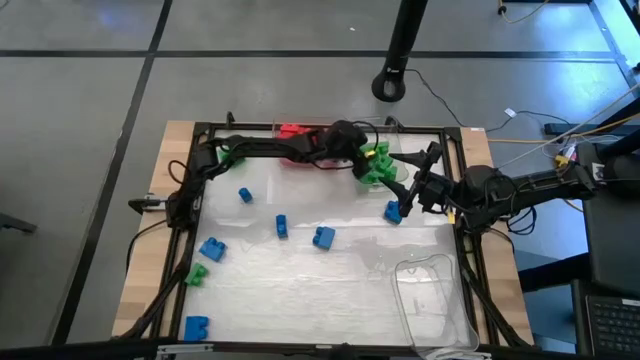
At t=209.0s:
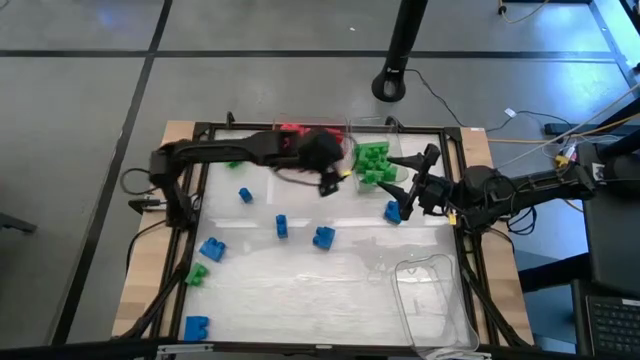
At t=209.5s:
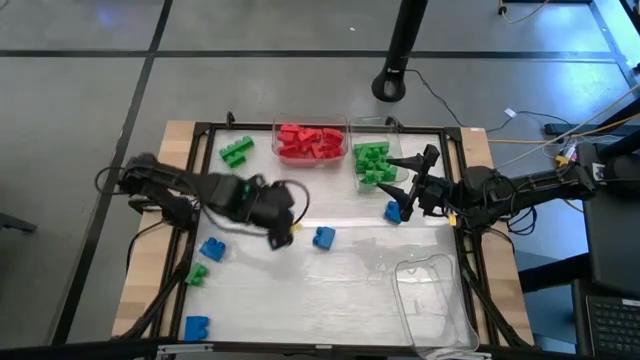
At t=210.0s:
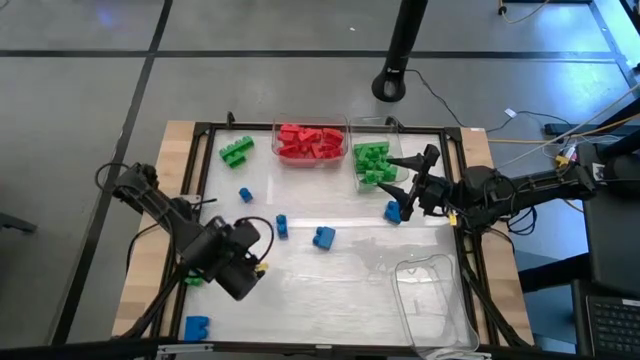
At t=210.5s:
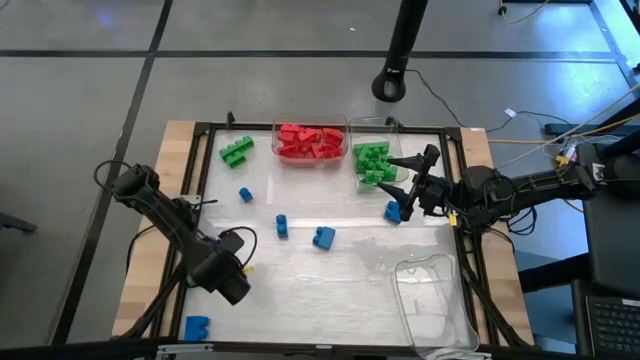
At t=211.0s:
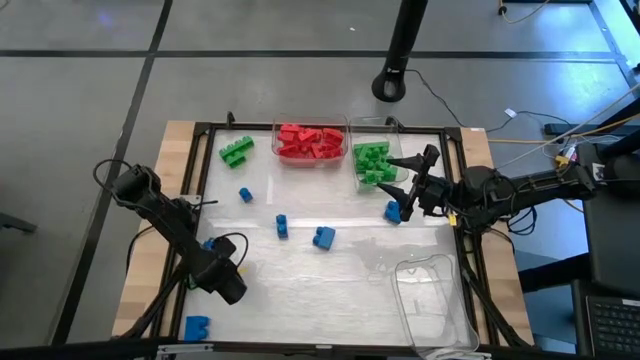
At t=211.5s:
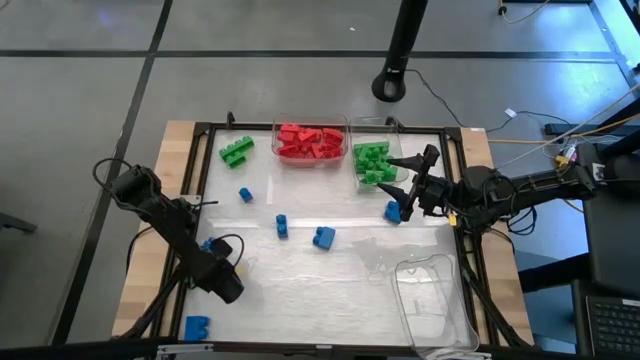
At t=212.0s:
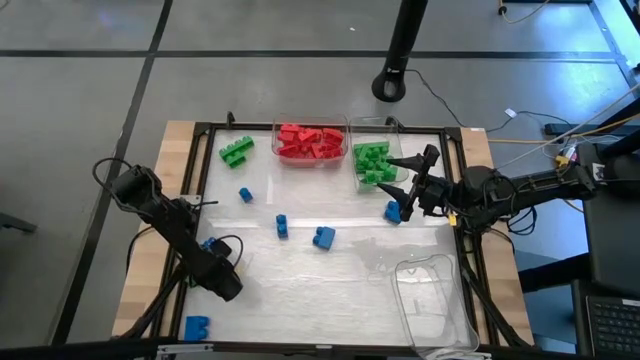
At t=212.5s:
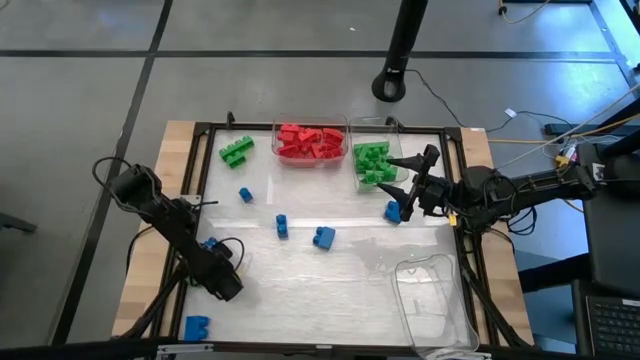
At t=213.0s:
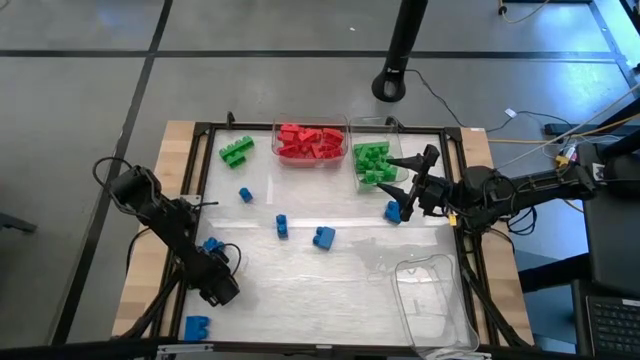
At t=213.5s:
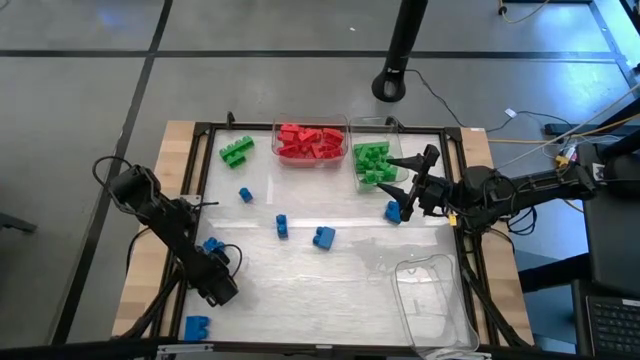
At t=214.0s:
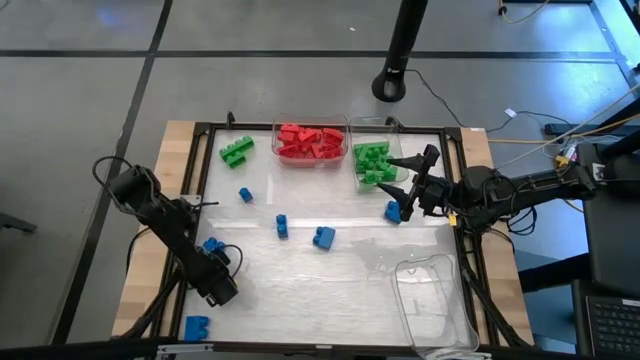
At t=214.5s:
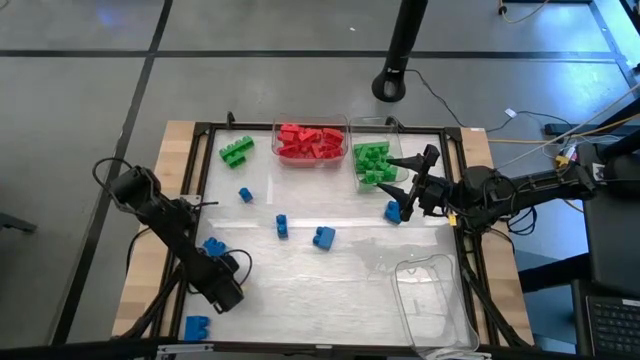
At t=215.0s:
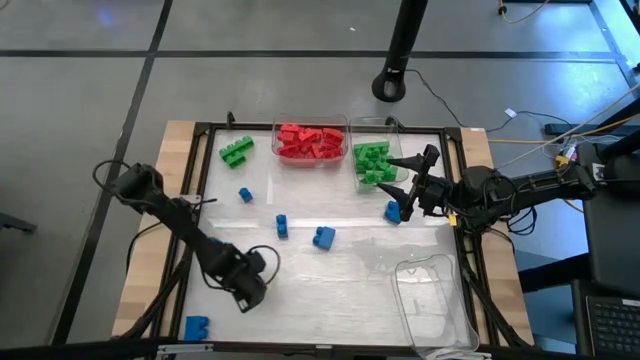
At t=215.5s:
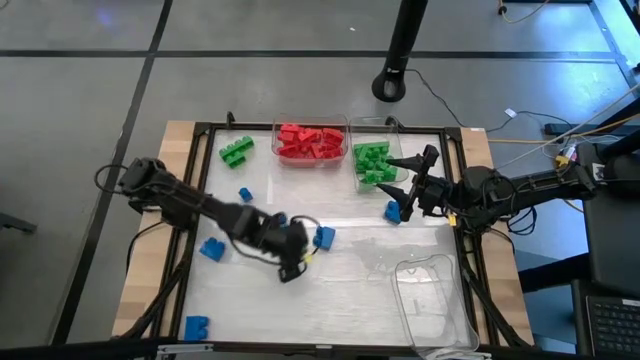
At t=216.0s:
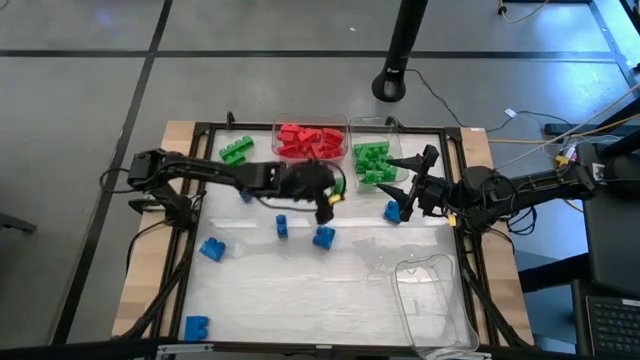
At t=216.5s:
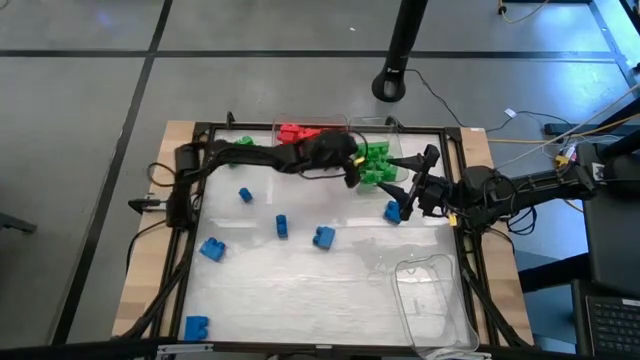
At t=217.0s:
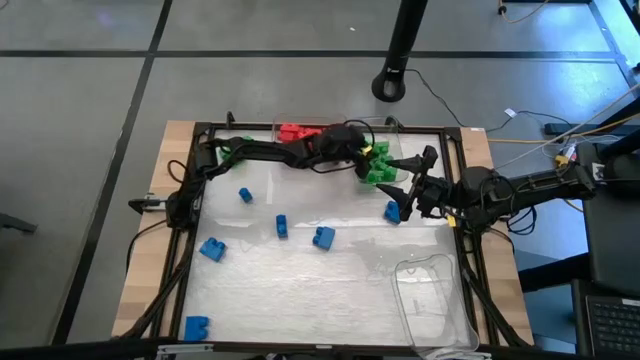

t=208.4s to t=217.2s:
Task: Sort blocks
Put the green game piece into the top right transparent bin

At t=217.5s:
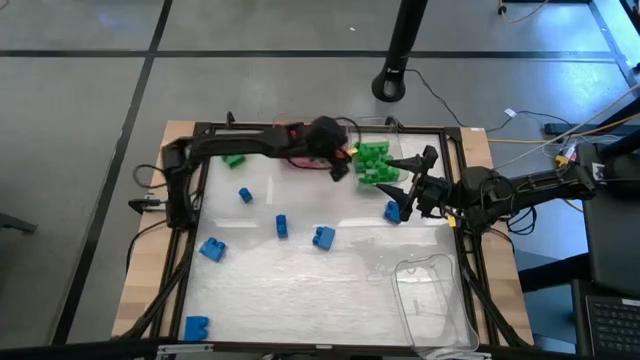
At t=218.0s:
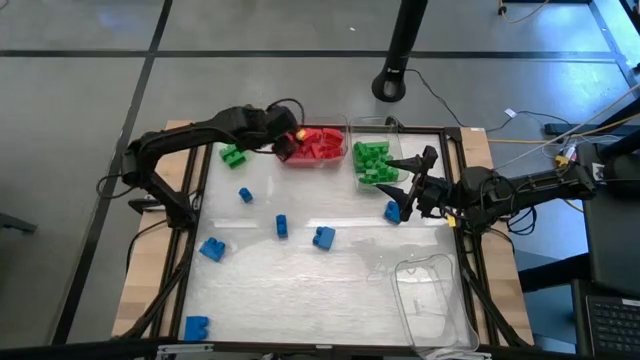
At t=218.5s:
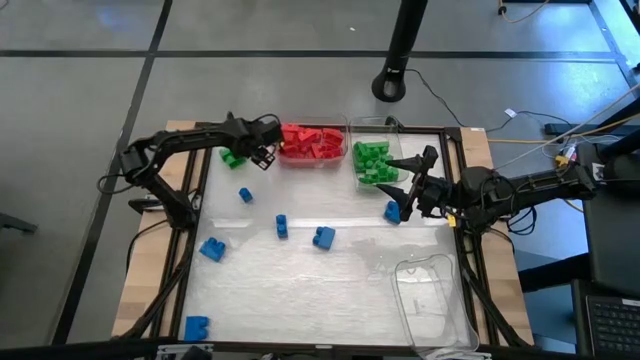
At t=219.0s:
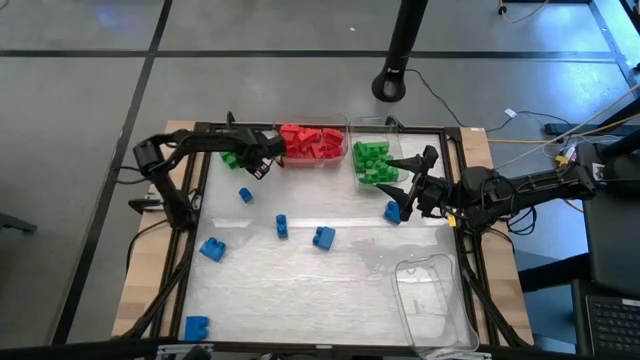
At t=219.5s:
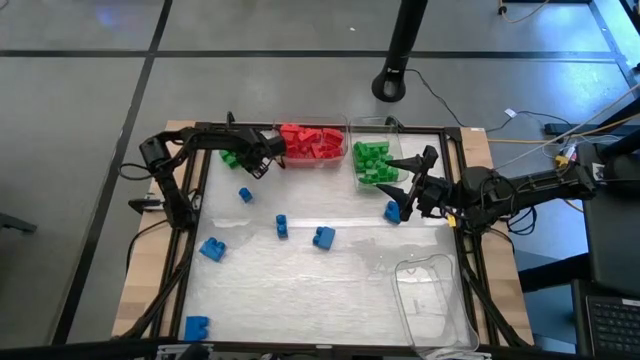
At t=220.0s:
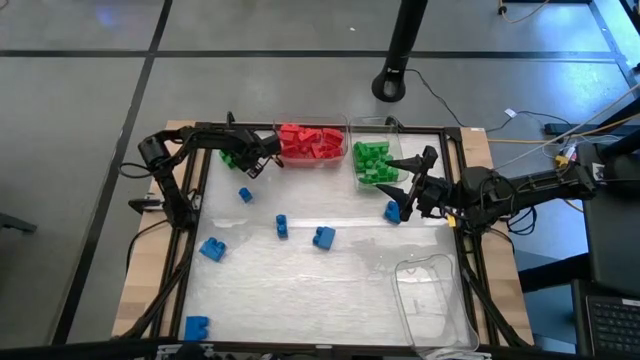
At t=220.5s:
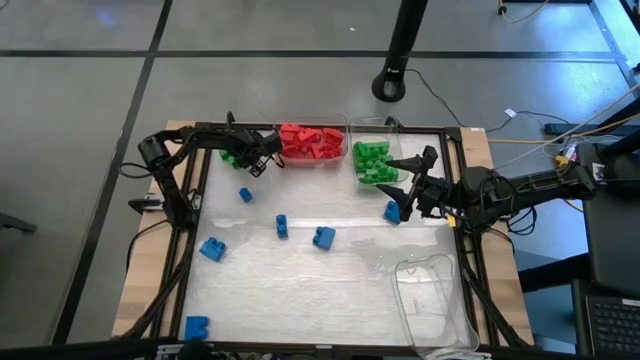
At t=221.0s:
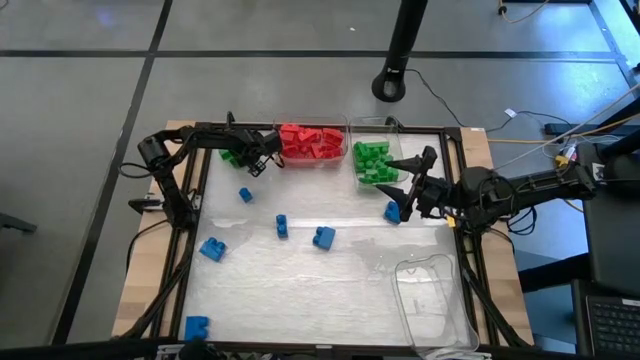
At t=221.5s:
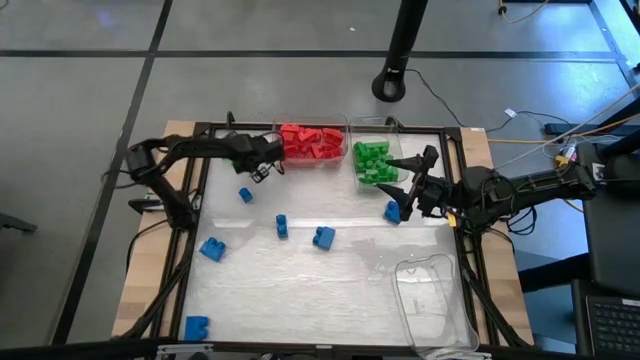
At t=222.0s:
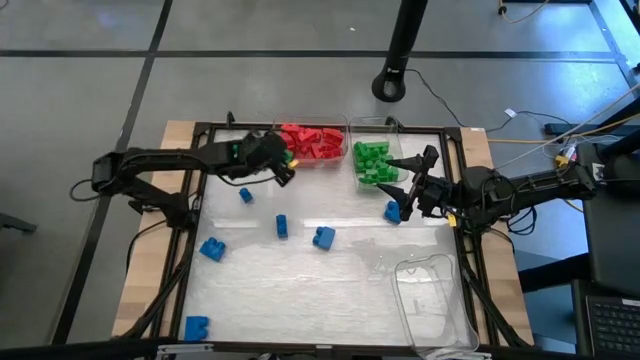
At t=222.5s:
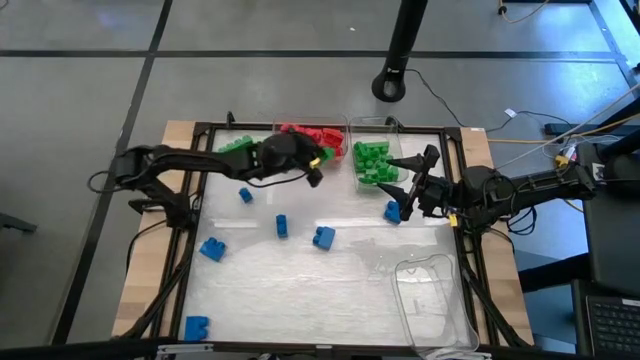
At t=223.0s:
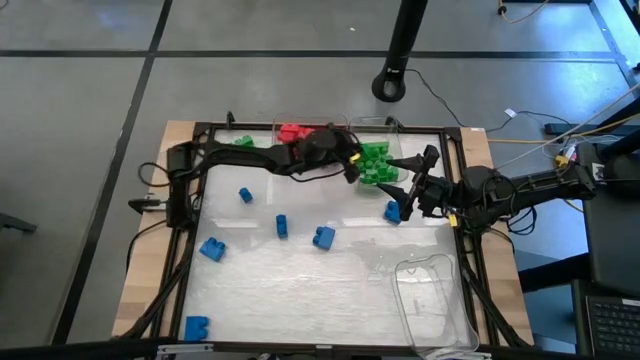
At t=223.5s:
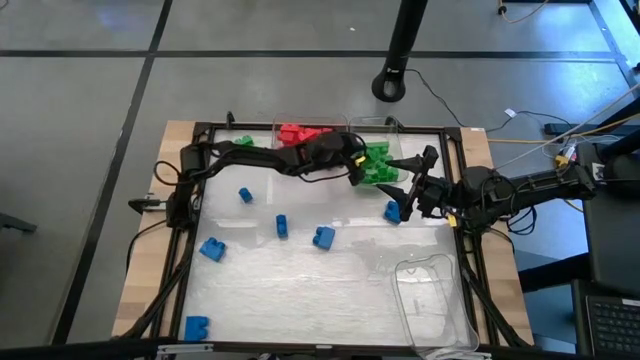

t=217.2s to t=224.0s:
Put the green game piece into the top right transparent bin

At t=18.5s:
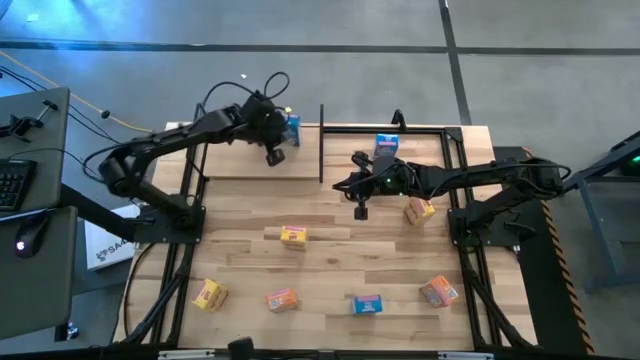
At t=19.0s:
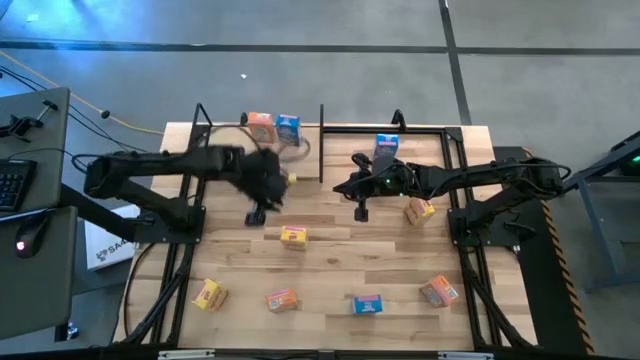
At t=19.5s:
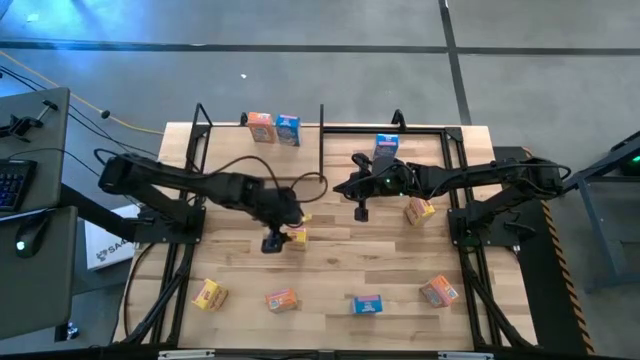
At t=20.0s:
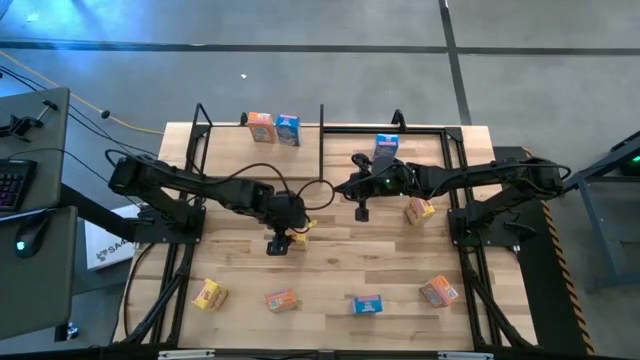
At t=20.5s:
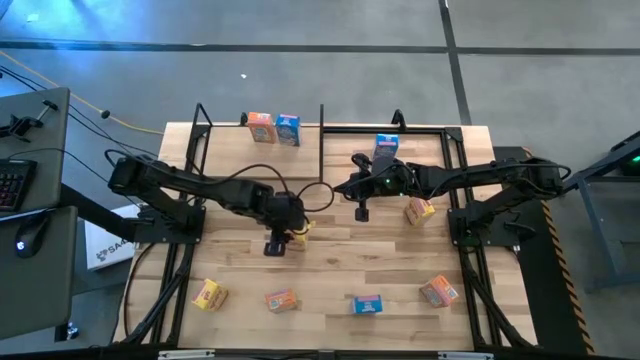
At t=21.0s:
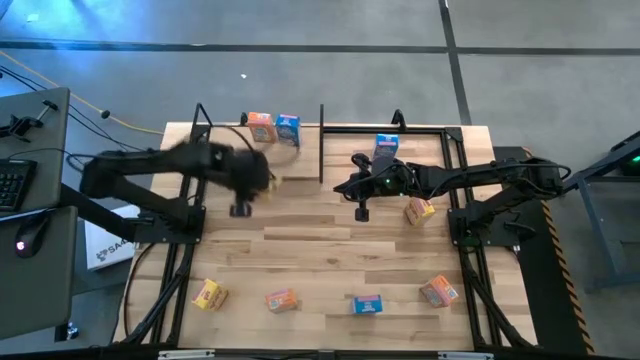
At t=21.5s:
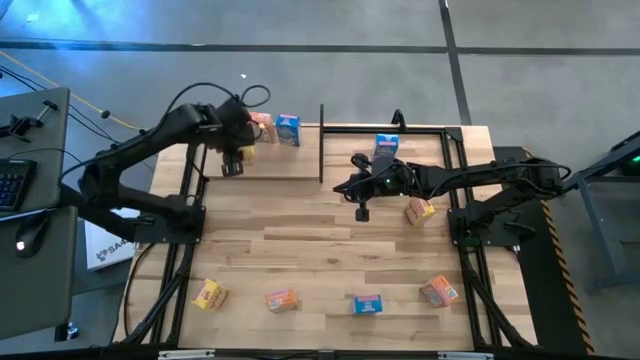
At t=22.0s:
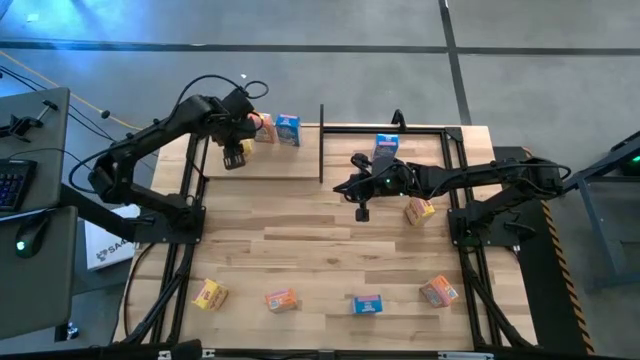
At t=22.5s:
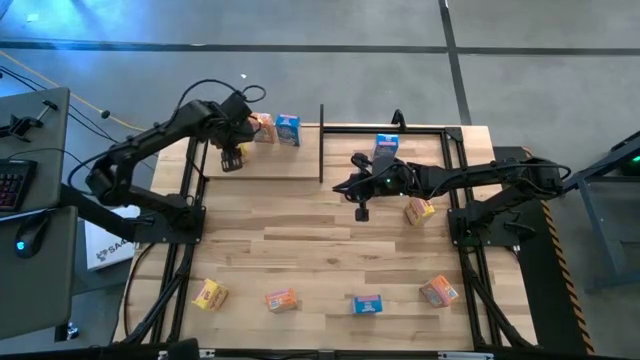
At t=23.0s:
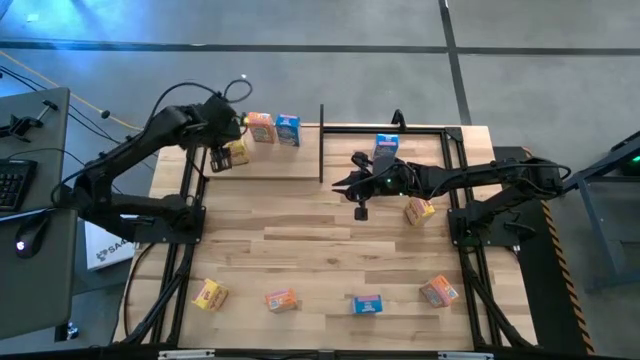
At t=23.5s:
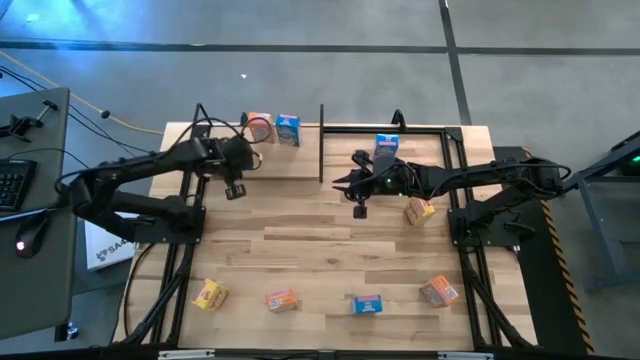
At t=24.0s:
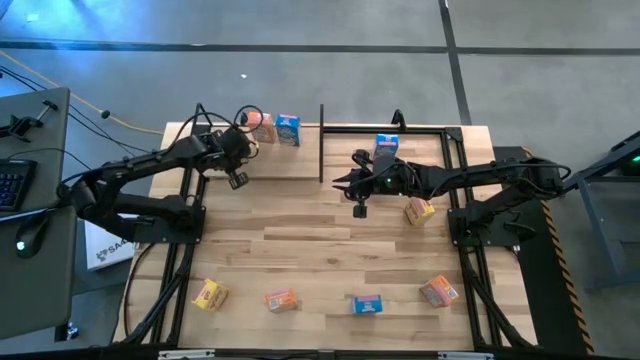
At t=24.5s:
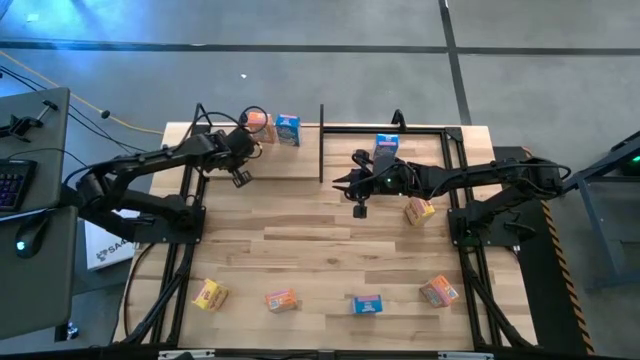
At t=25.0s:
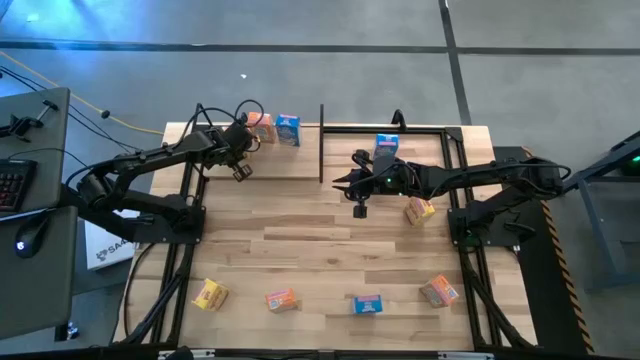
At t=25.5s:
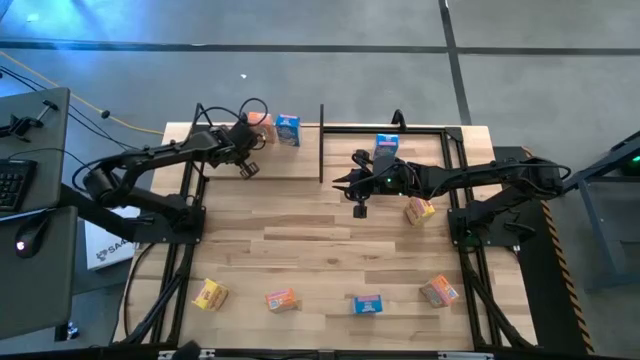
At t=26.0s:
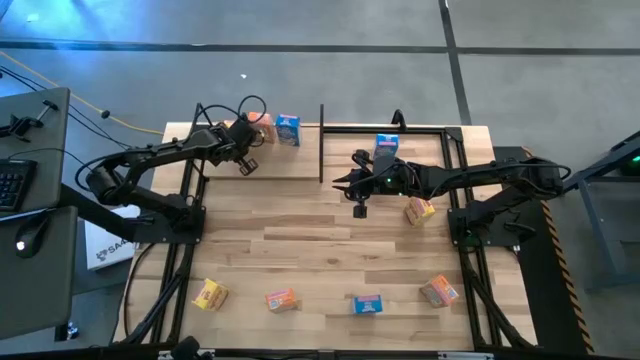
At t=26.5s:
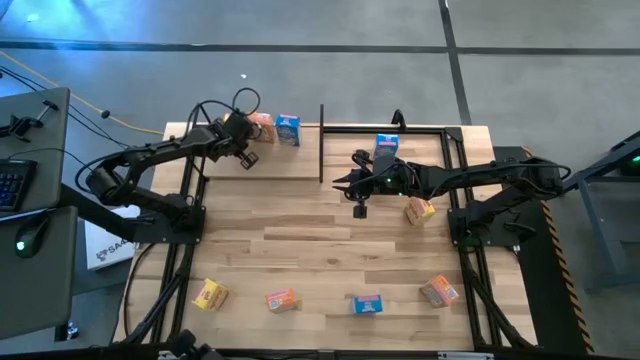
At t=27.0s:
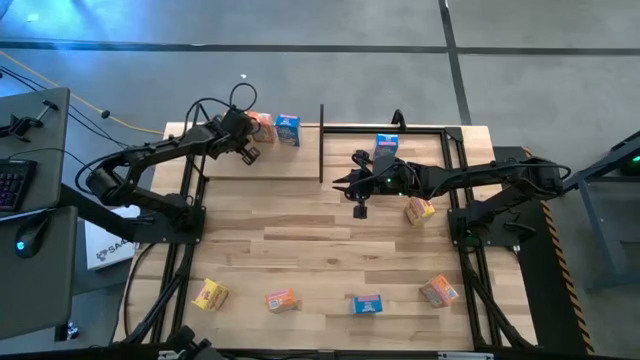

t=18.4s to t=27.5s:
Task: Stack cereal on shelf
Put the middle yellow cereal box on the shelf
